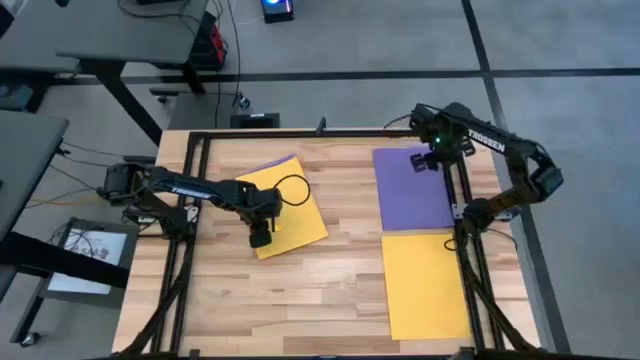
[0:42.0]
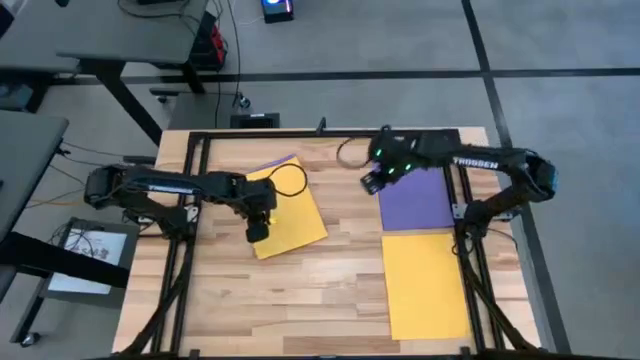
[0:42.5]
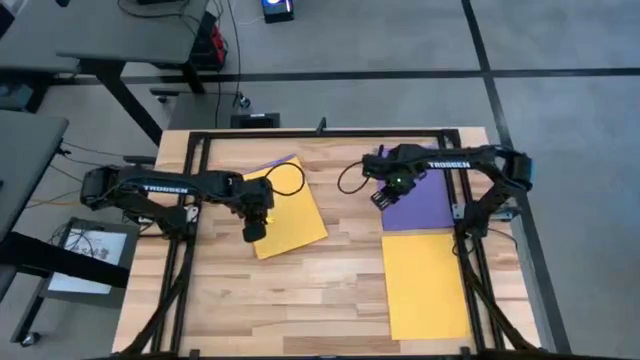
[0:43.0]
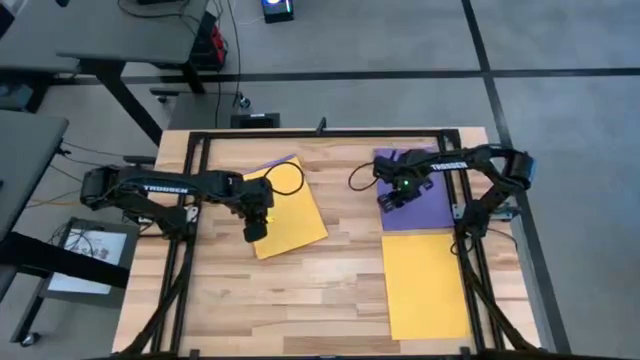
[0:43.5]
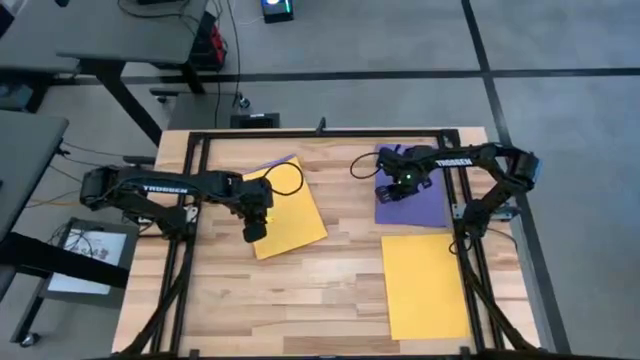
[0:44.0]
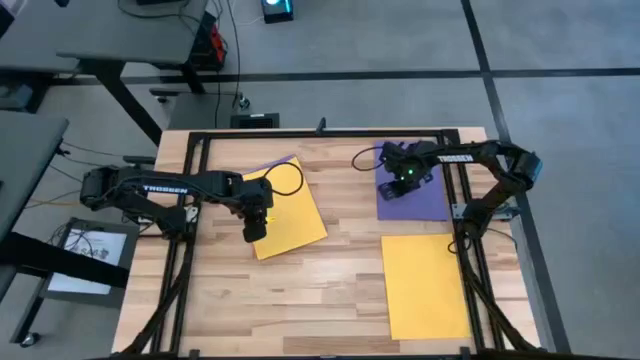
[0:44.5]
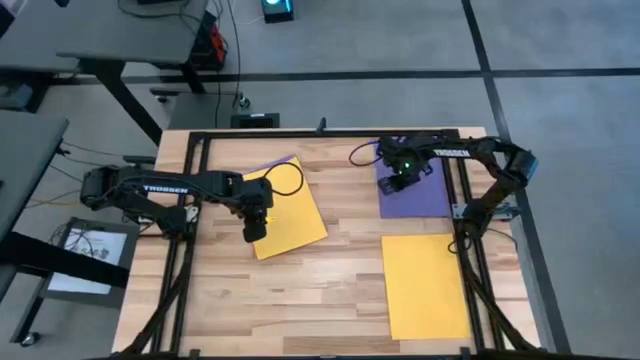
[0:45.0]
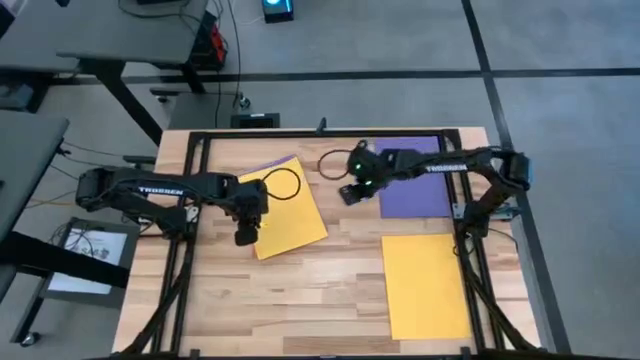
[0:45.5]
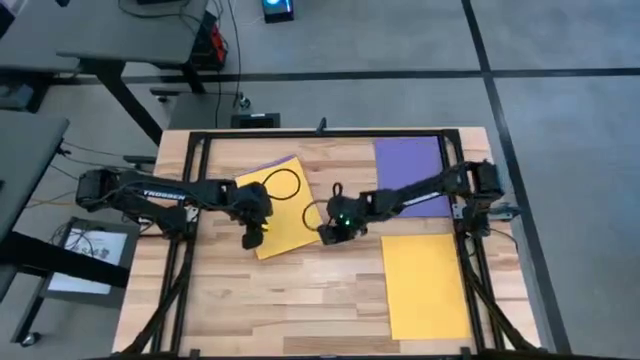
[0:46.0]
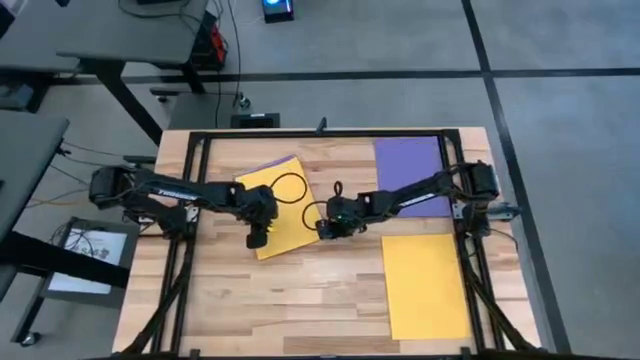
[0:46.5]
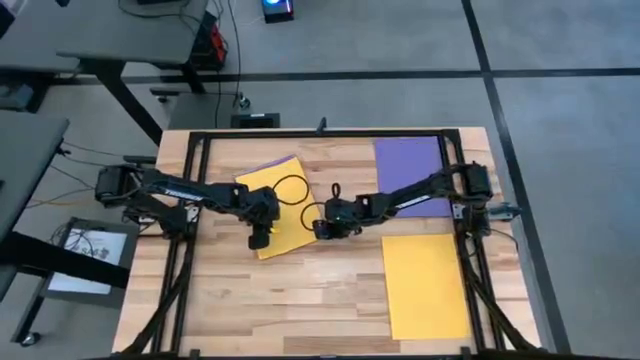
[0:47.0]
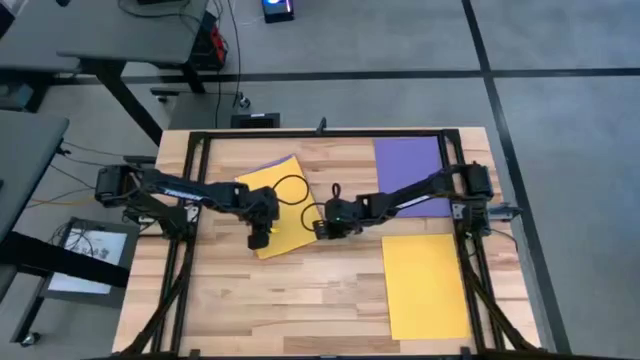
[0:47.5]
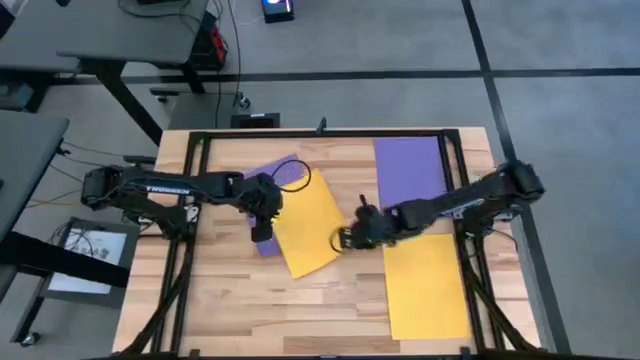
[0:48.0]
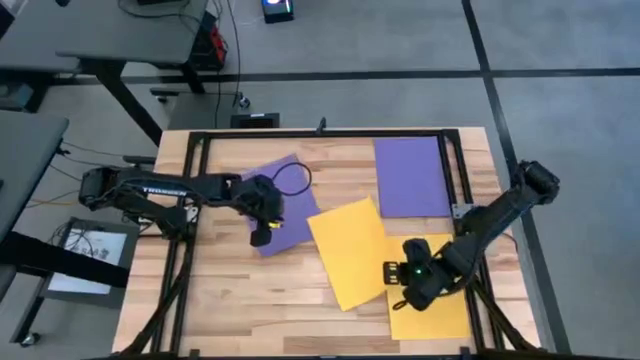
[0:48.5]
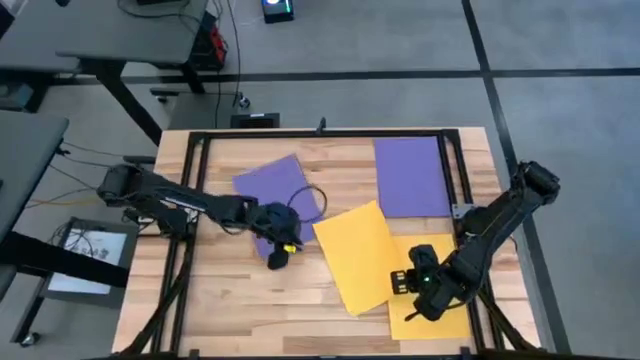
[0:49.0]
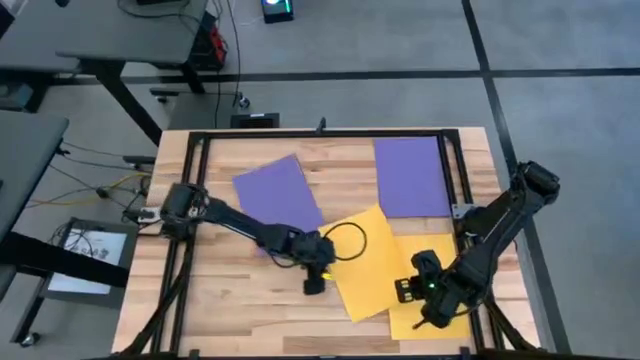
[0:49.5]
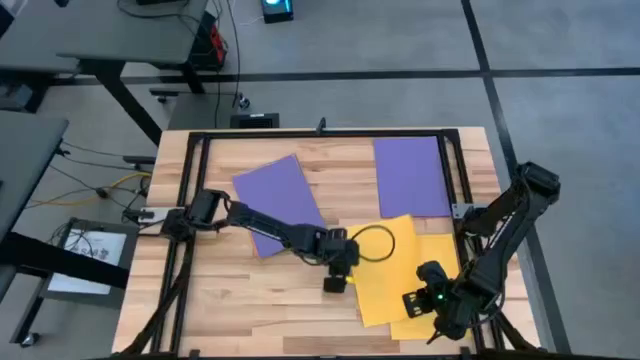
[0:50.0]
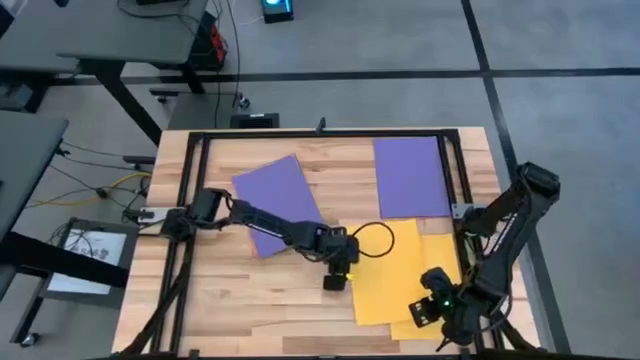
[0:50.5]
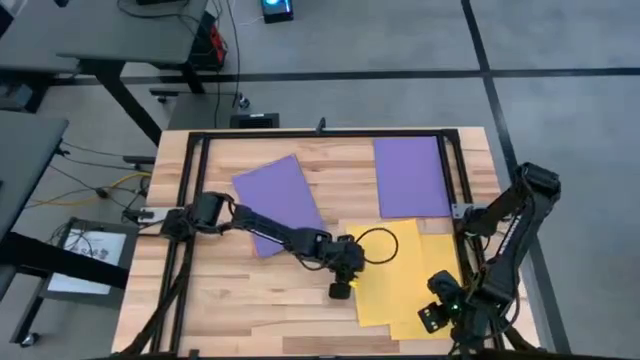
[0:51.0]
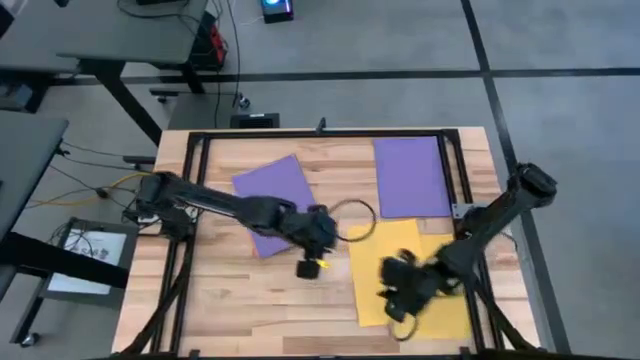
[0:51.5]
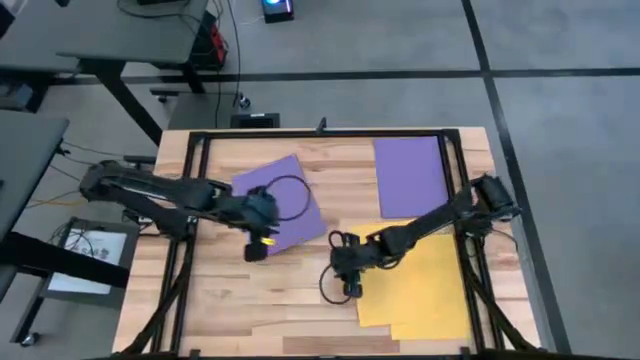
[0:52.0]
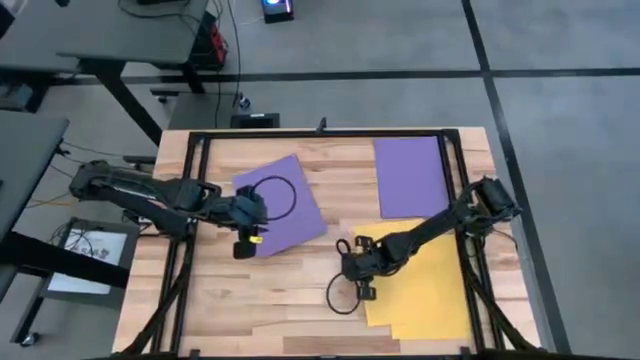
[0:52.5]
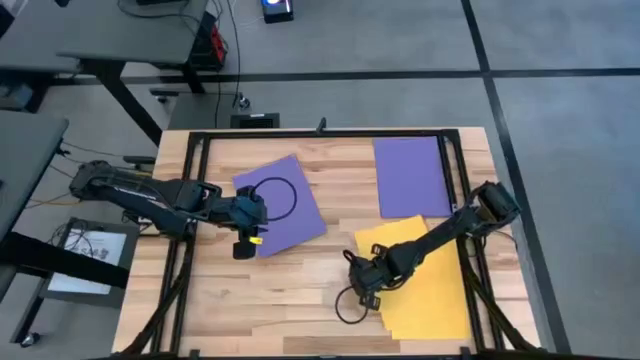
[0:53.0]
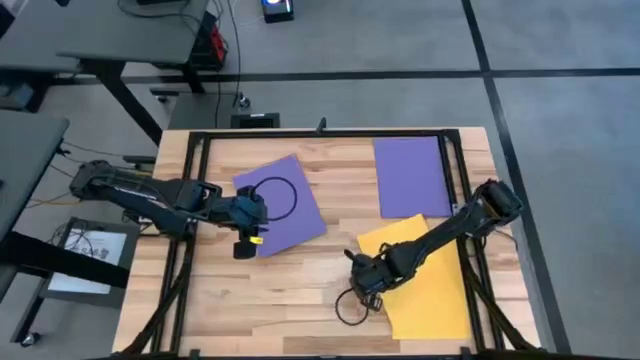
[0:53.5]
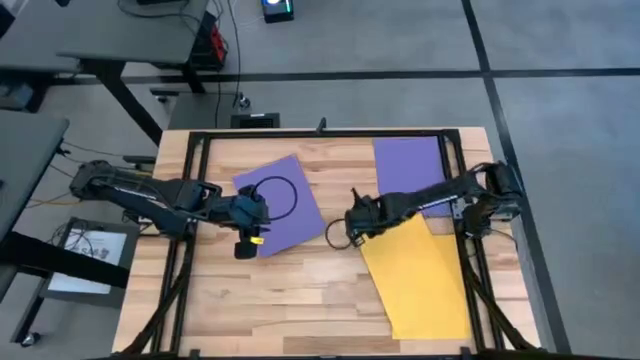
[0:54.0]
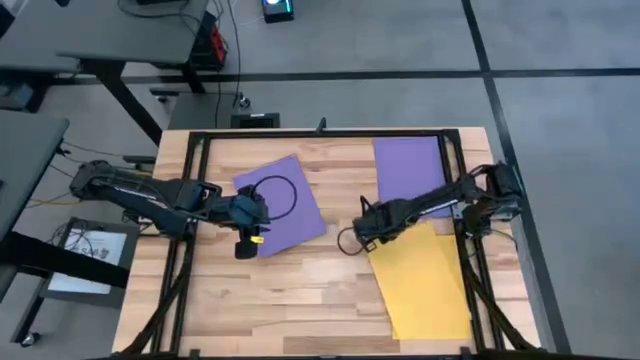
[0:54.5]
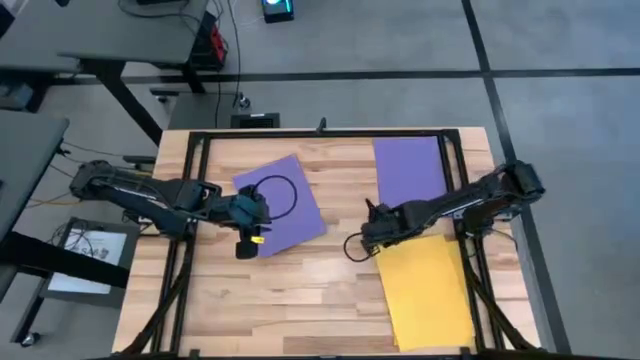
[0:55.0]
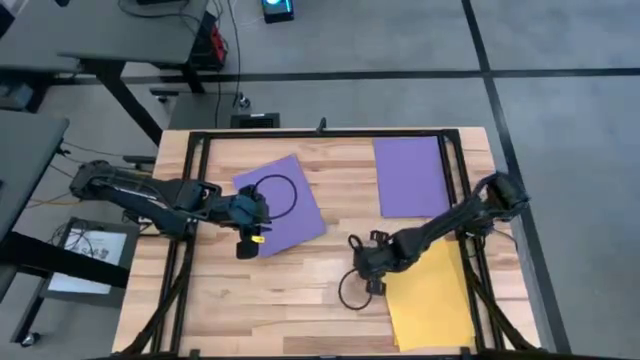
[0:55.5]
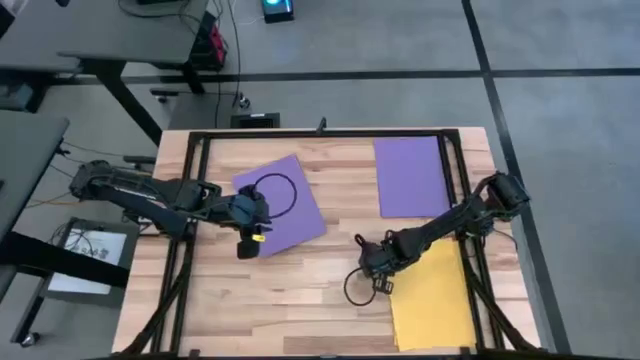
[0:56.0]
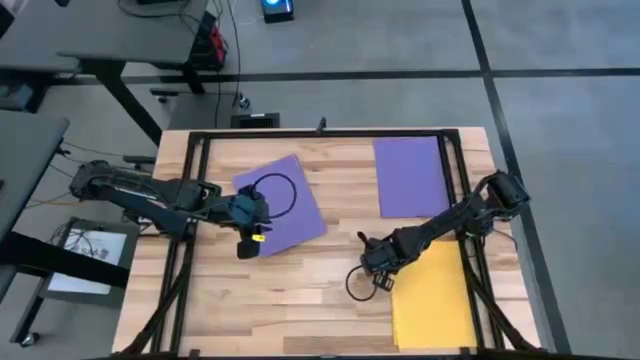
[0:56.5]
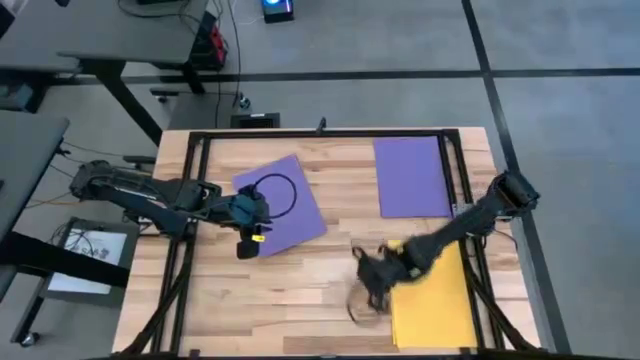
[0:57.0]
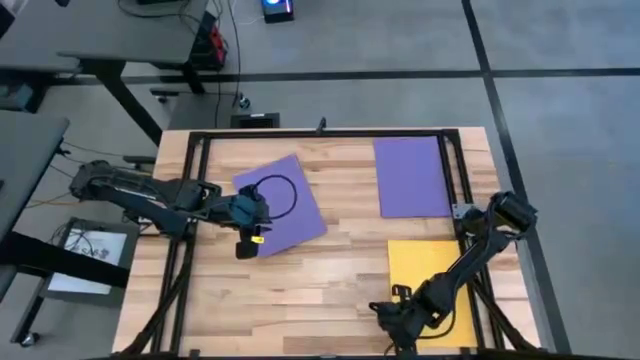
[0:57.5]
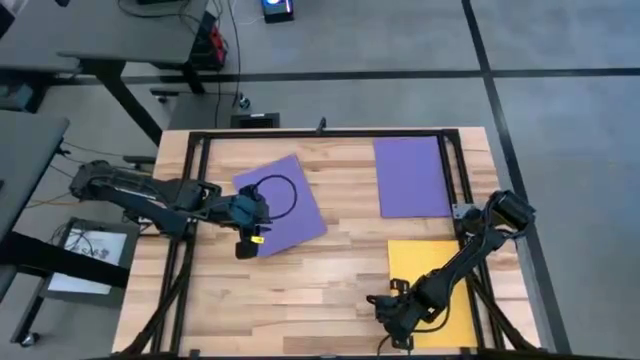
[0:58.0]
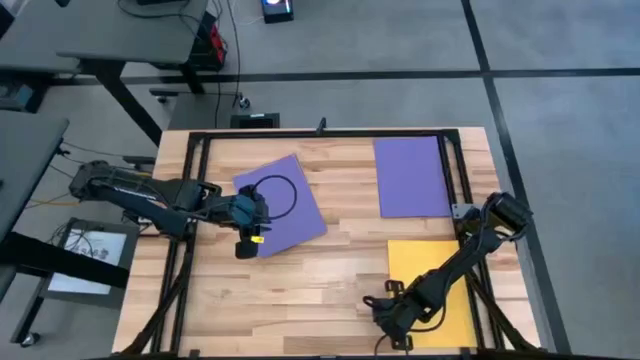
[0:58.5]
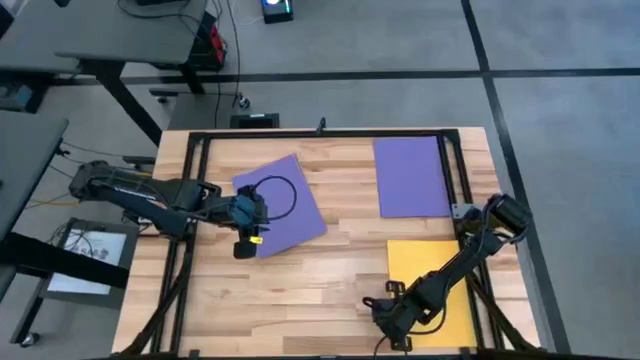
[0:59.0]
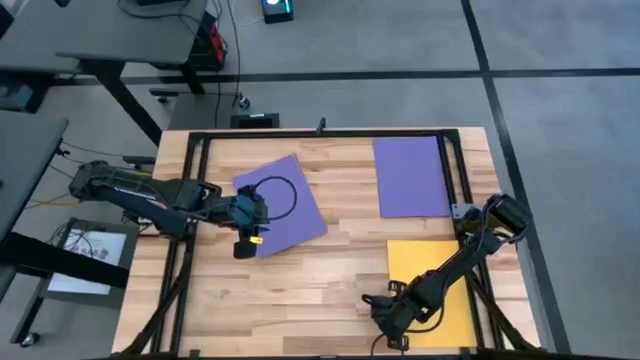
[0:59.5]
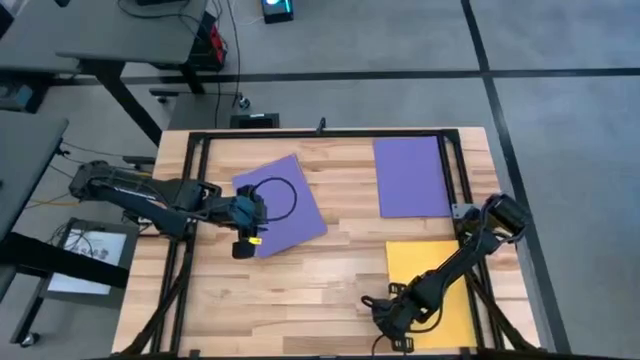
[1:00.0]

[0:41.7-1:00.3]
Task: Organize paper
Stack the yellow paper on the bottom right yellow paper

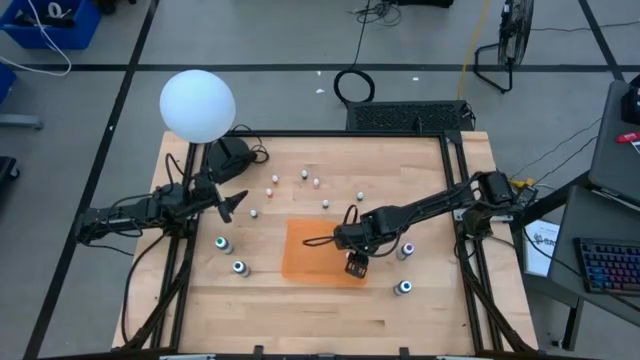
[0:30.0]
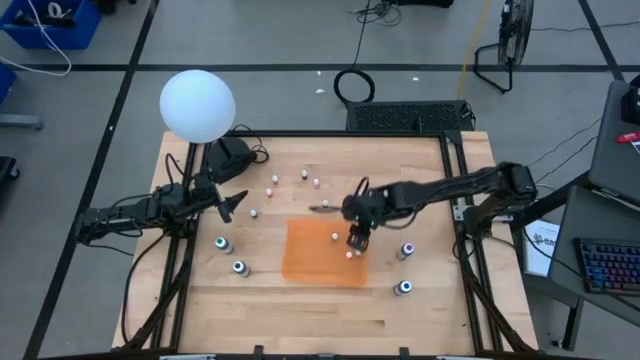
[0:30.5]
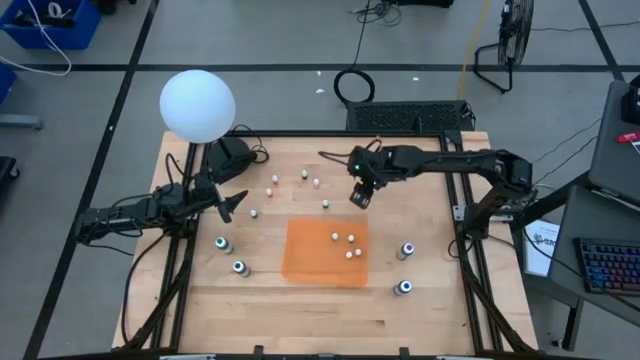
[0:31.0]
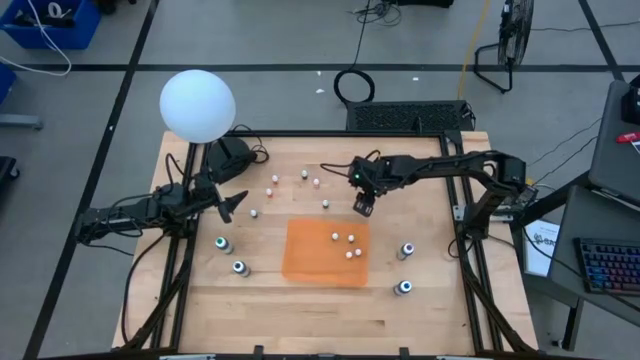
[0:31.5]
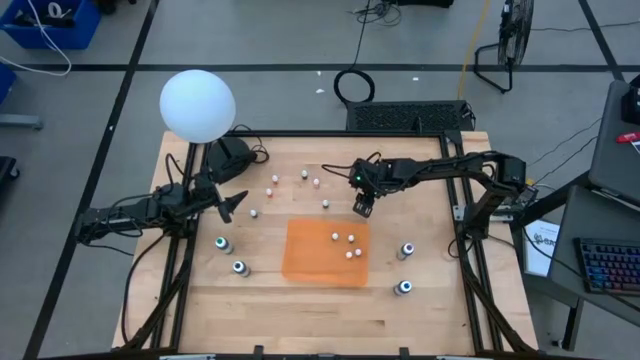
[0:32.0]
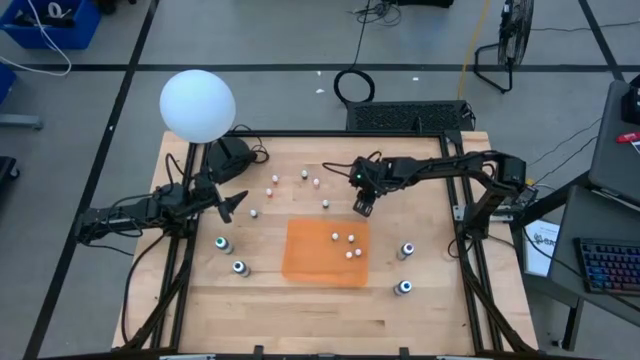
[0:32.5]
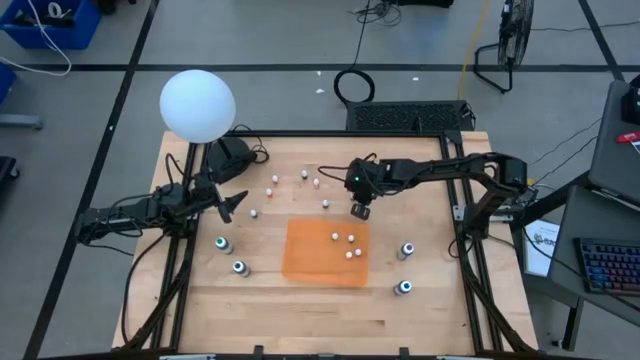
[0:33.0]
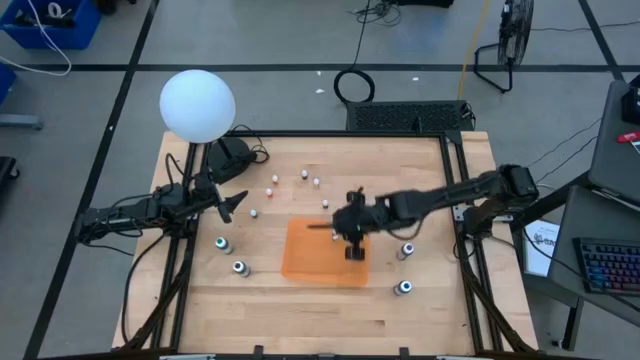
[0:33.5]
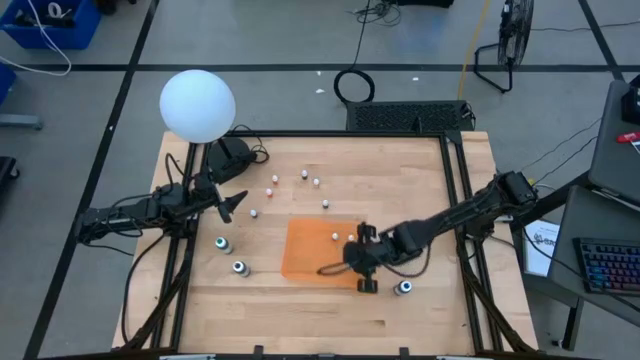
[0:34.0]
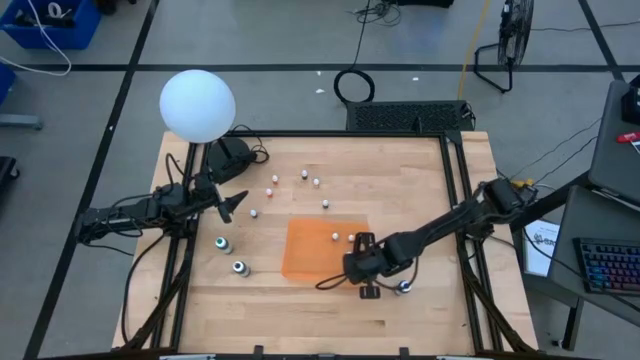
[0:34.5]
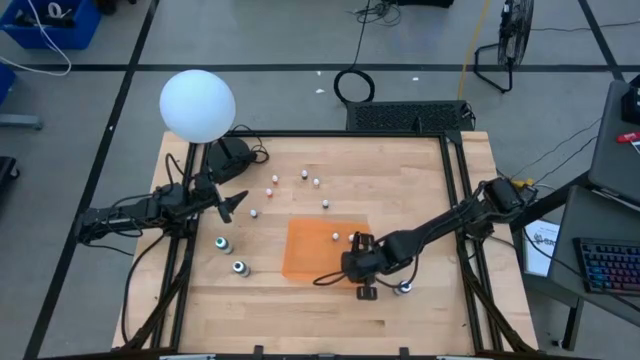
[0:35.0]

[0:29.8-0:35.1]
Task: Pick & Place food coloring
Put the black food coloring bottle into the orange bin
